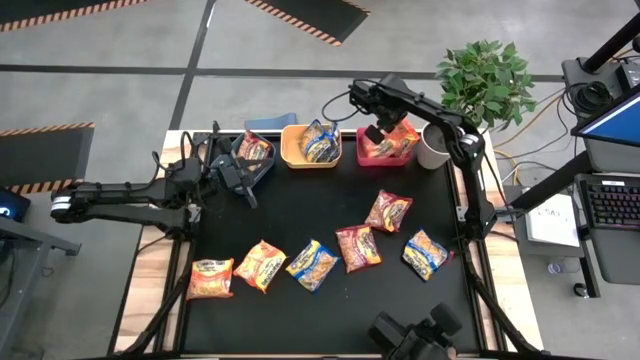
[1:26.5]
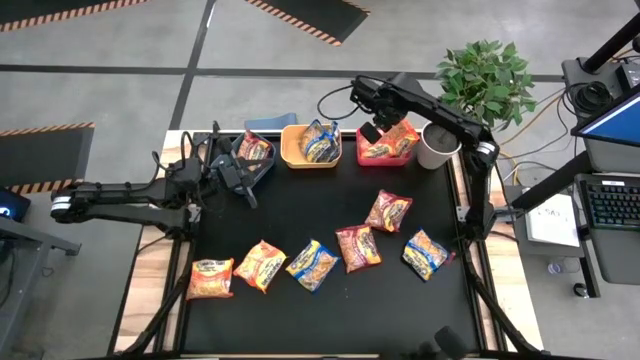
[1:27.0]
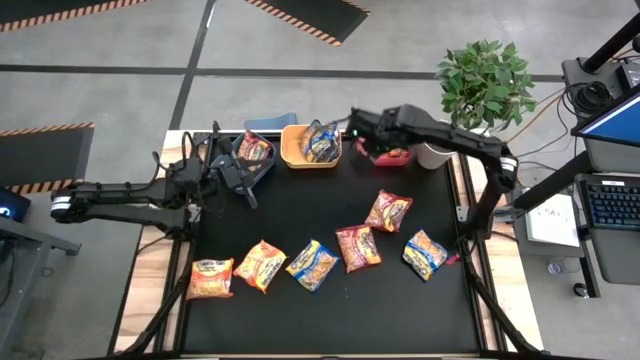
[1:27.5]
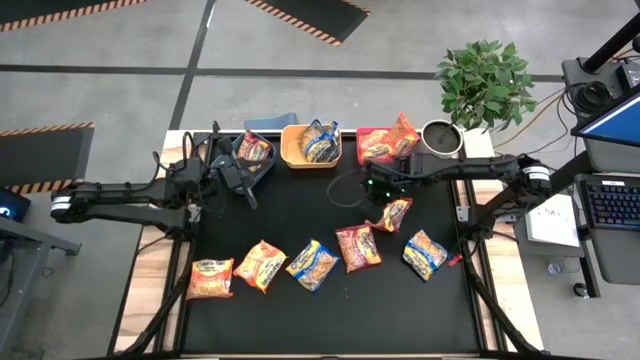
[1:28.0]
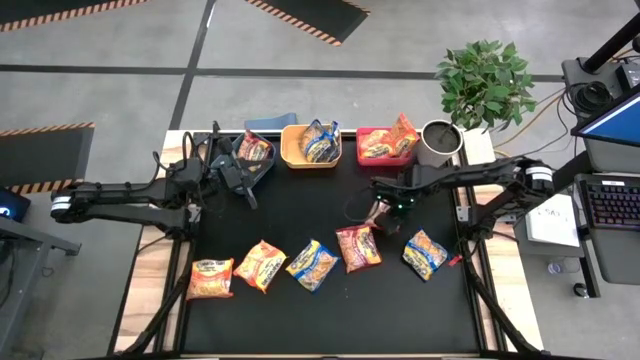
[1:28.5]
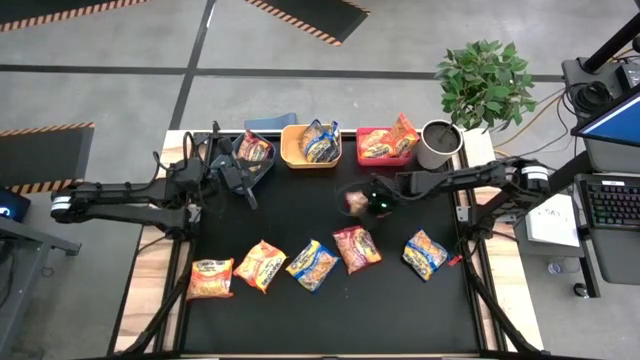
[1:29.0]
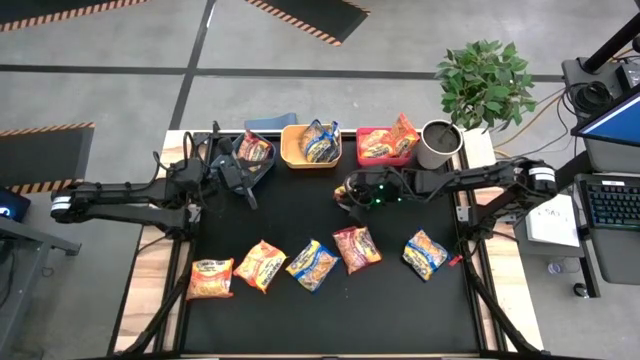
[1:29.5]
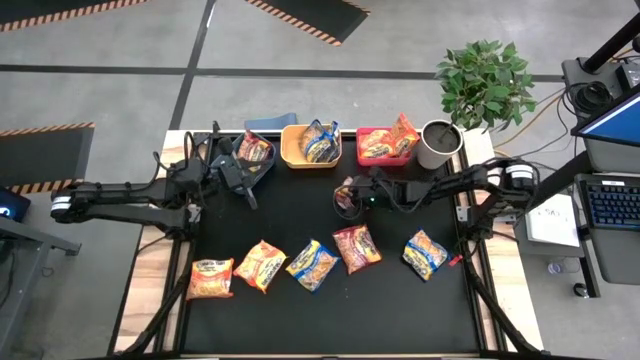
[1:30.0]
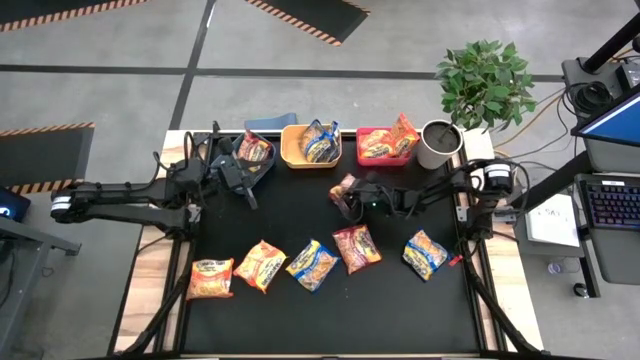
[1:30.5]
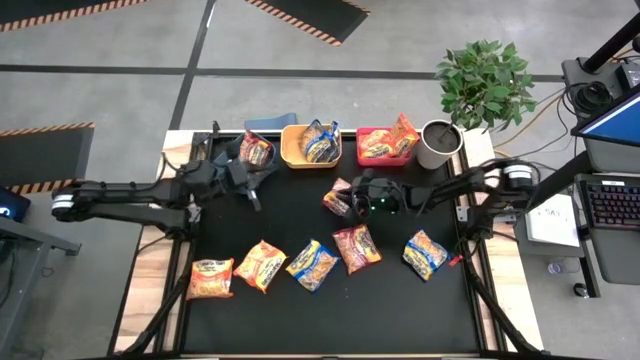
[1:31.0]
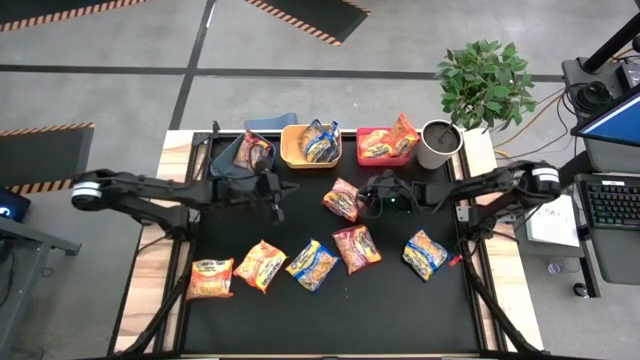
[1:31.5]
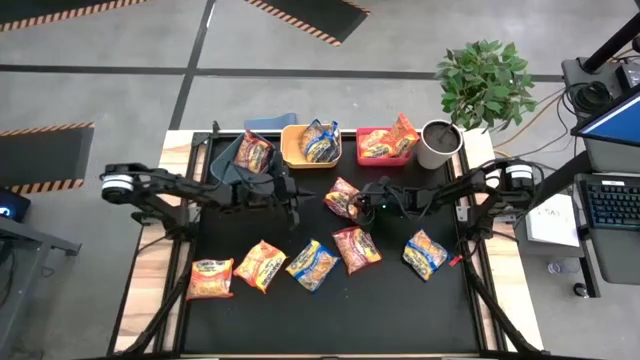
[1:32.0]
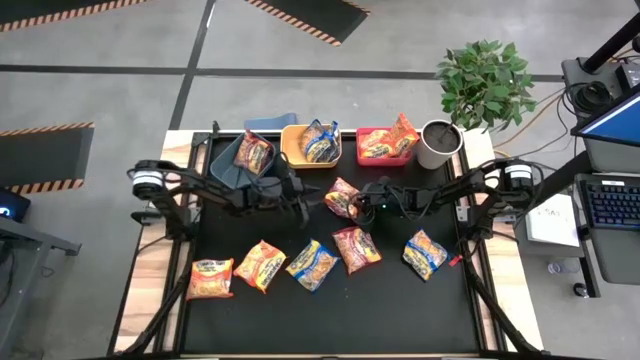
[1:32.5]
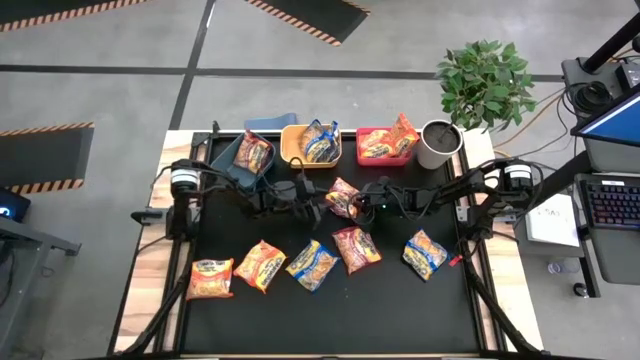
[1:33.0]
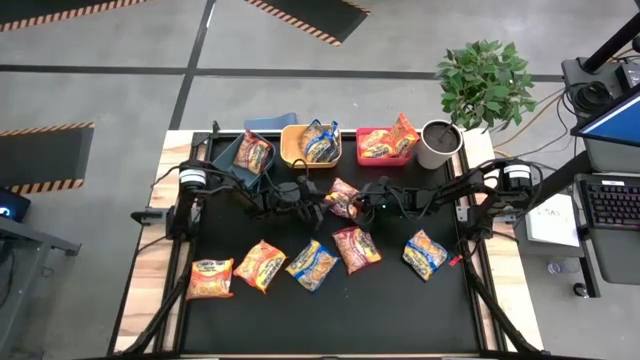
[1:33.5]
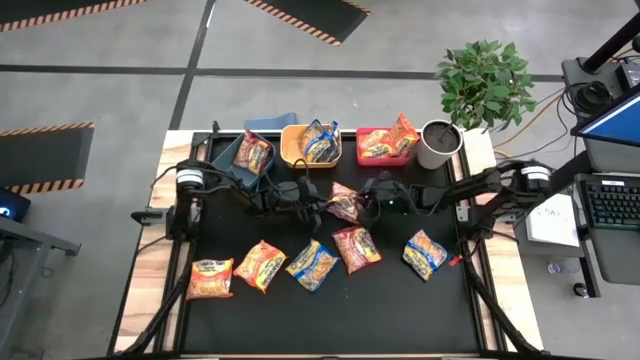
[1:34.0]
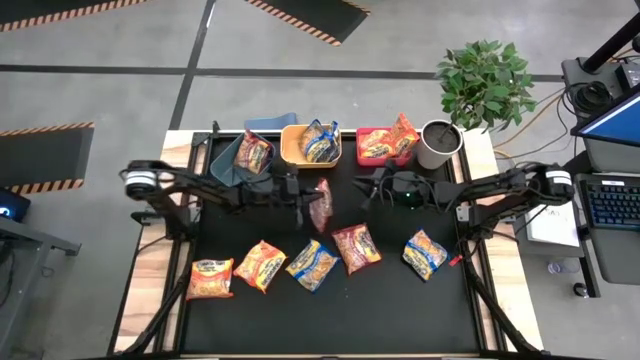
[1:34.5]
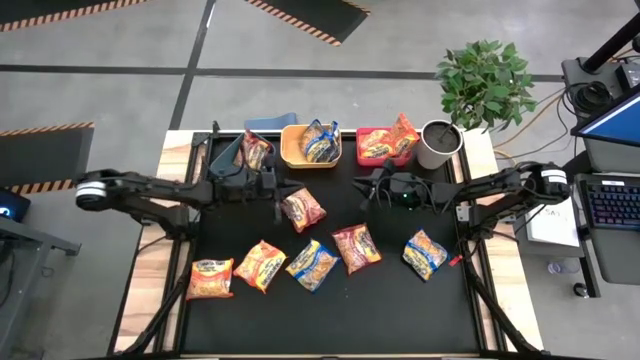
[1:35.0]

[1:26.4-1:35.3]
Task: Sort Maruchan noodles
Put the red noodle pack into the blue bin

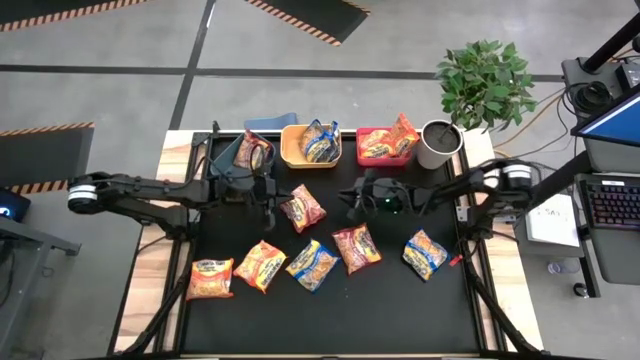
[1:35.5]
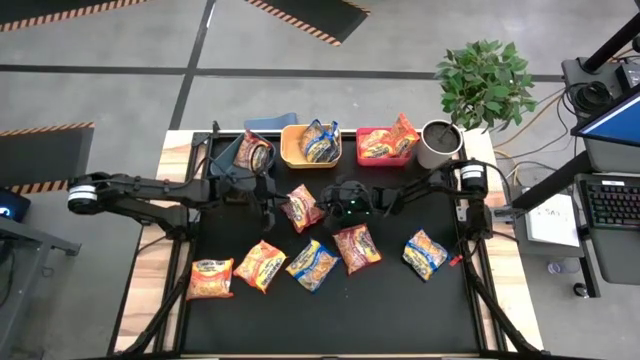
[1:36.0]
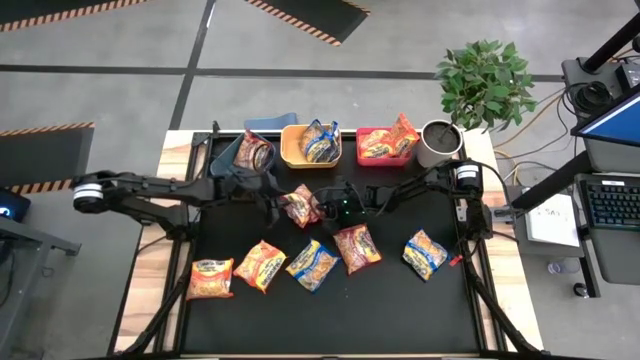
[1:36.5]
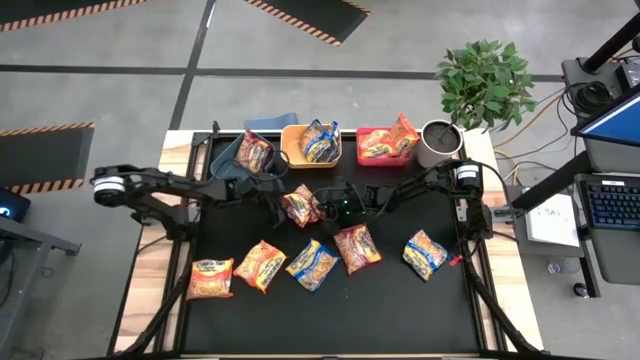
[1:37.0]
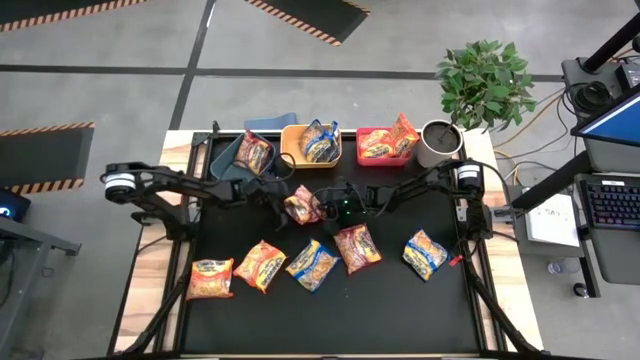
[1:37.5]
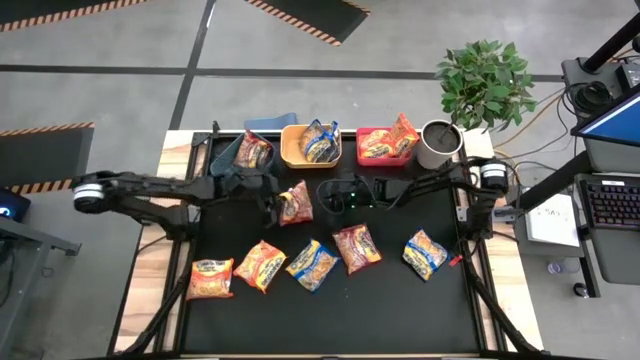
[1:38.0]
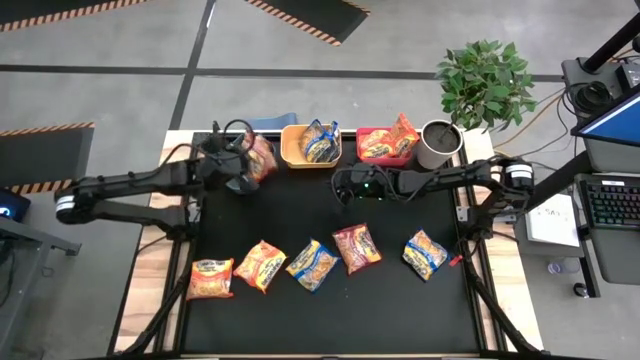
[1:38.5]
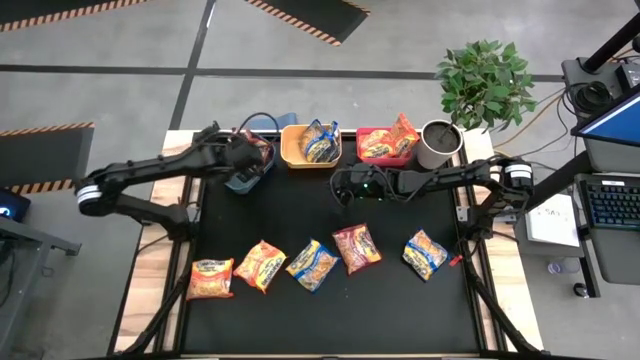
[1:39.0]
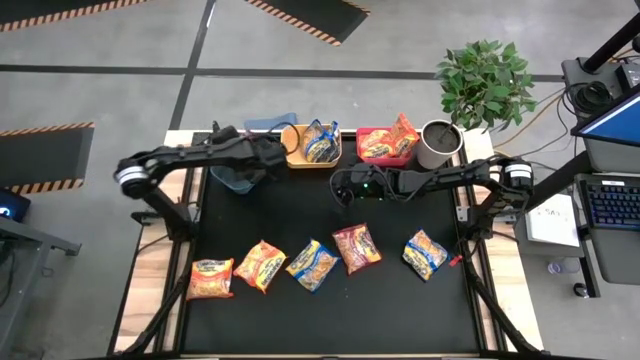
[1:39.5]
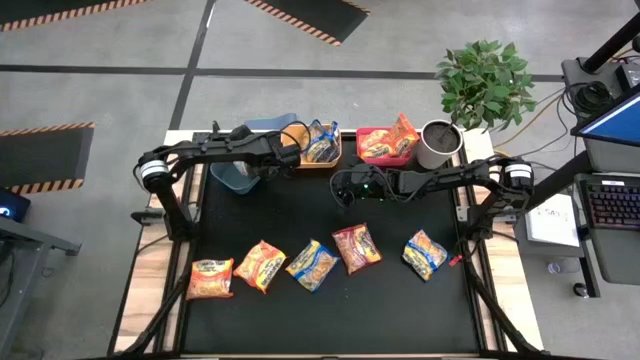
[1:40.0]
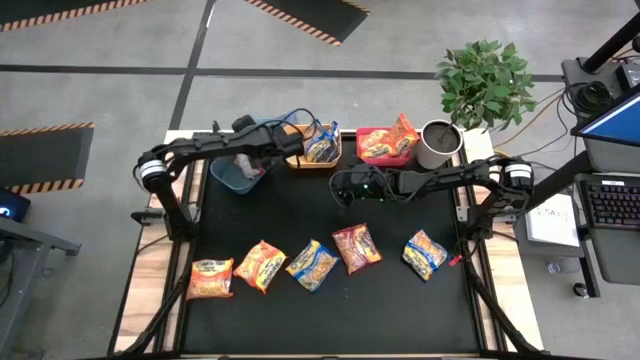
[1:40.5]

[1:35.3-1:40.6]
Put the red noodle pack into the blue bin

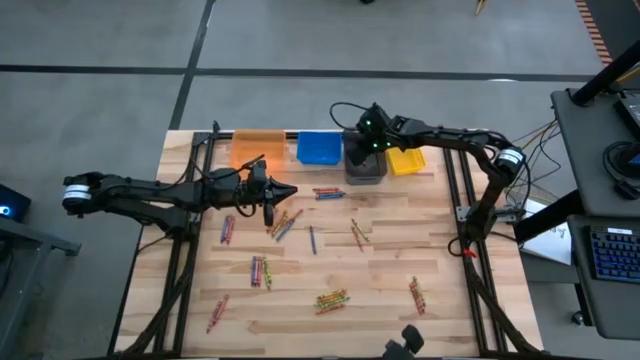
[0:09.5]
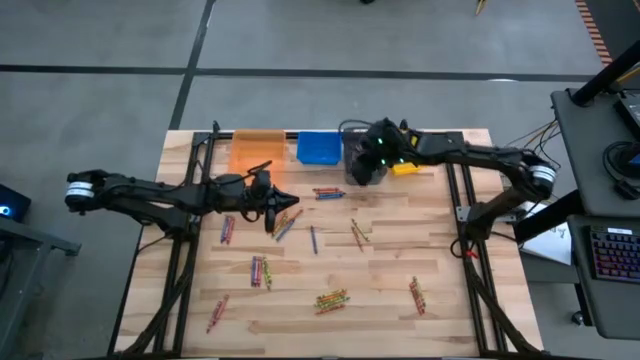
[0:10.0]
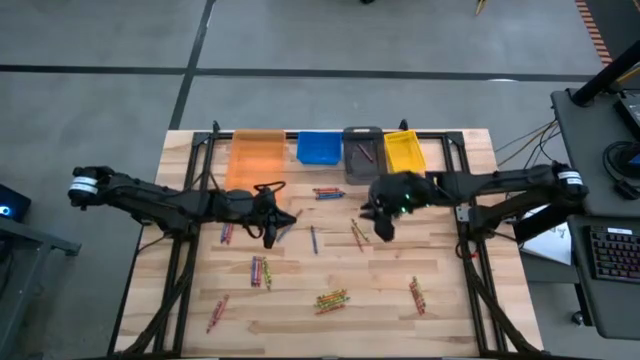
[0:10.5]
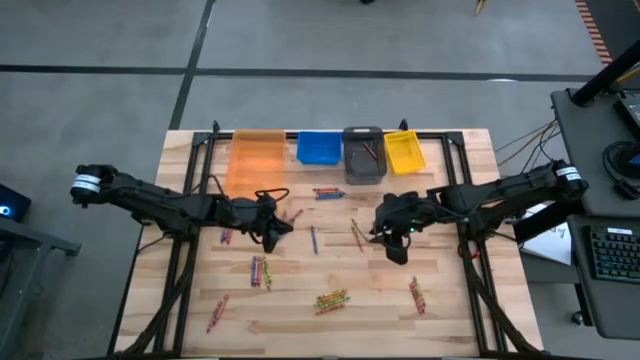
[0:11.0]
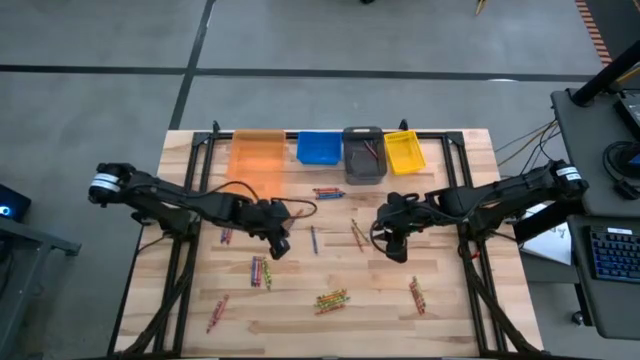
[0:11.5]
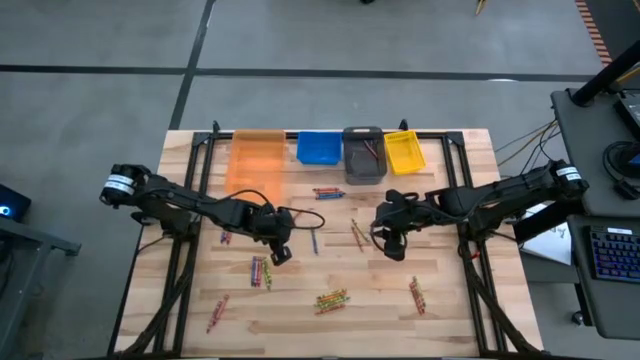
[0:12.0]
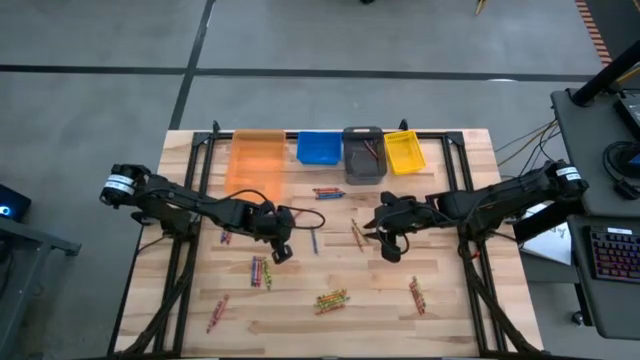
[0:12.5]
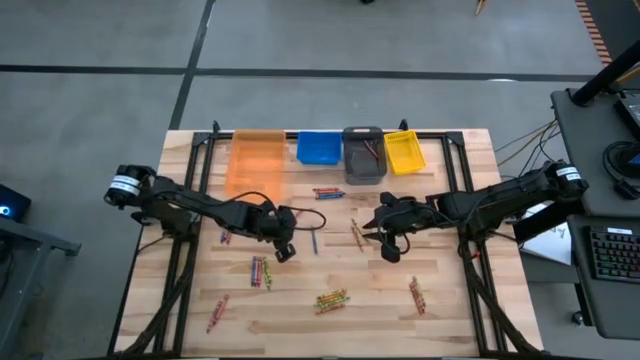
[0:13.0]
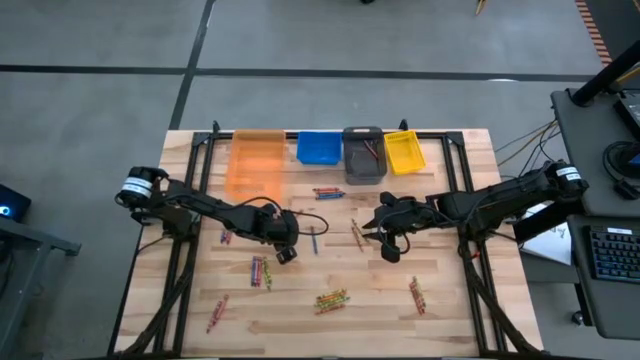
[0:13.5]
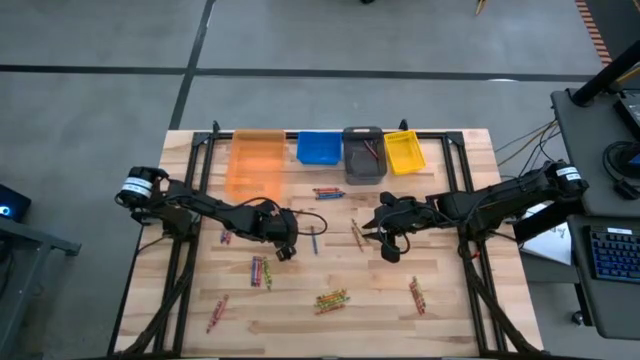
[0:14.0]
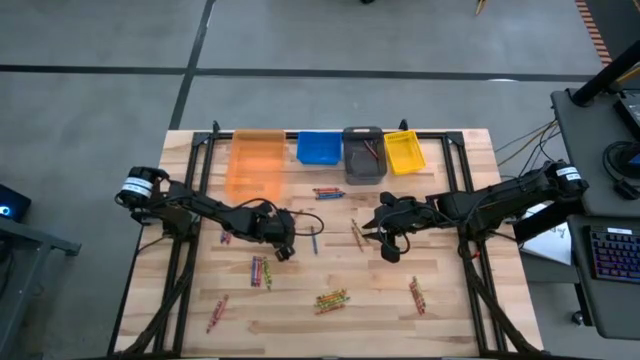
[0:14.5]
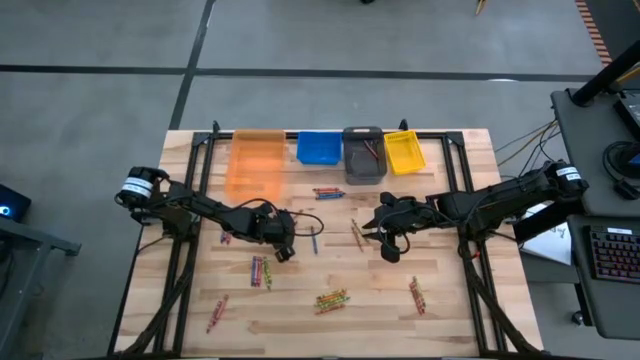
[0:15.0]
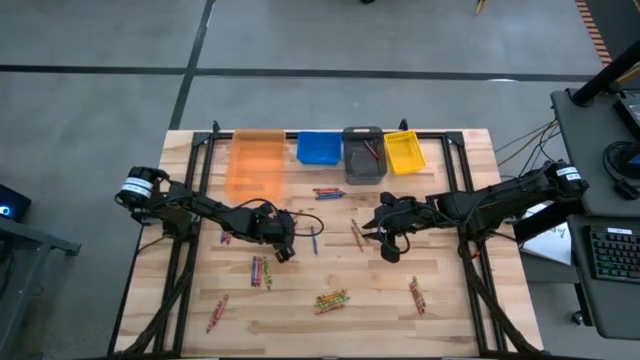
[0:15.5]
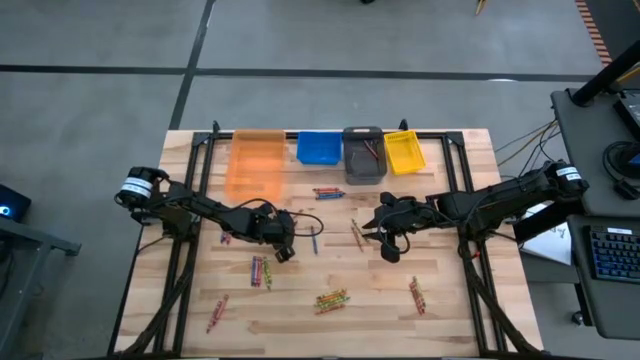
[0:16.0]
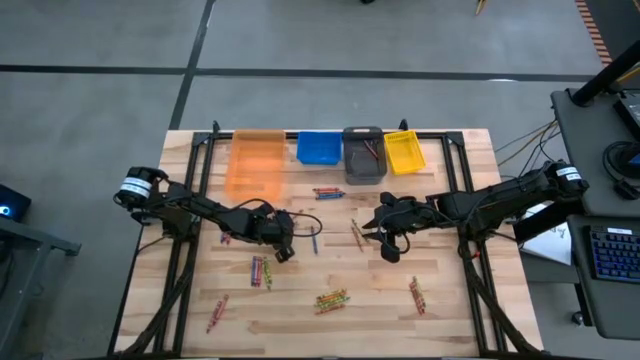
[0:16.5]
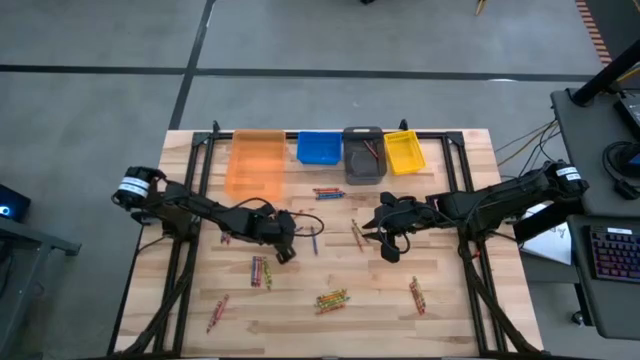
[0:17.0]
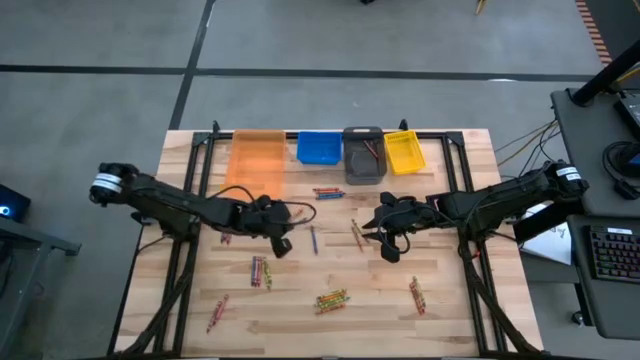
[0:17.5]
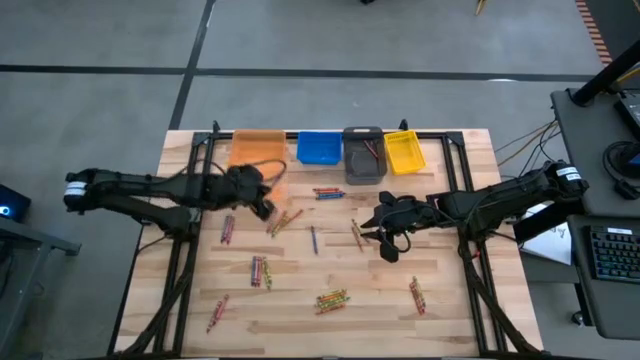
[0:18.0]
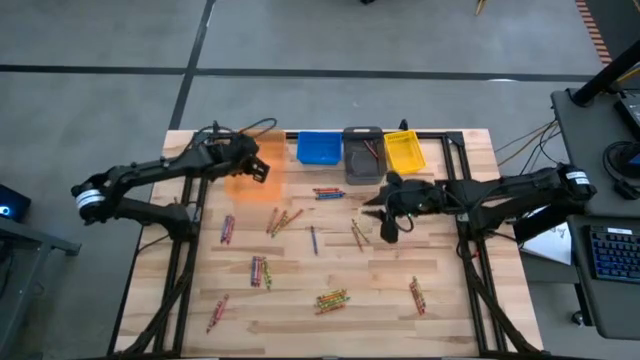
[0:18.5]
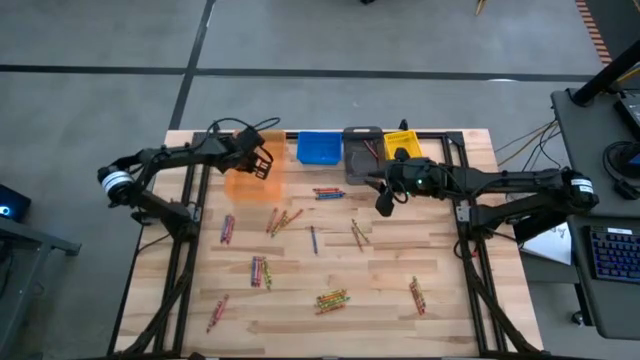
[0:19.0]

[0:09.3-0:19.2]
Task: Sort crayons
Put the blue crayon into the orange bin
